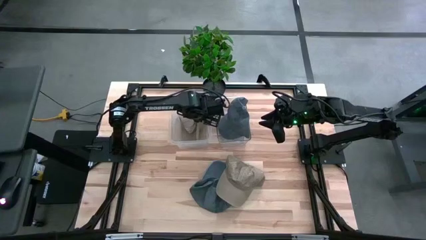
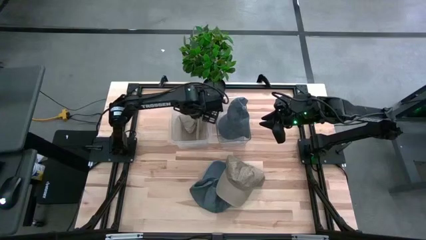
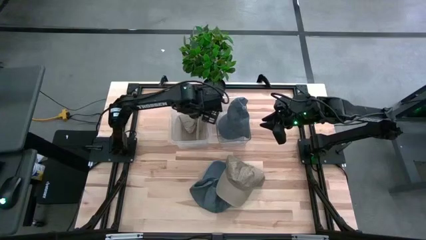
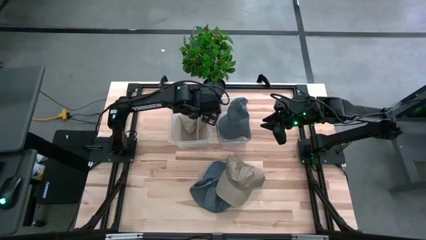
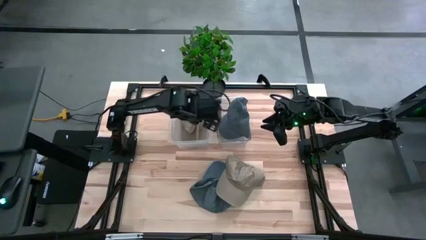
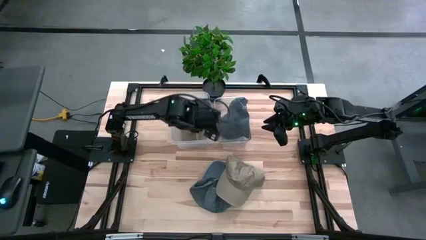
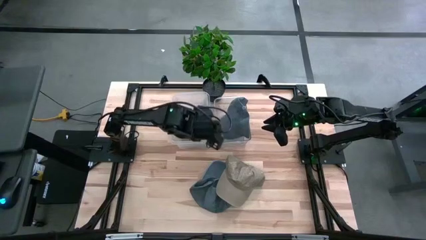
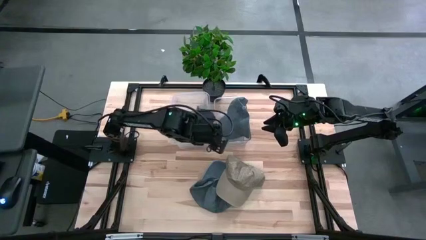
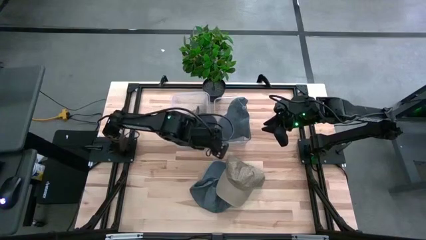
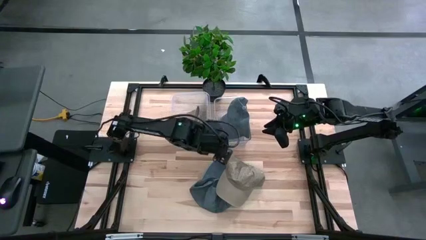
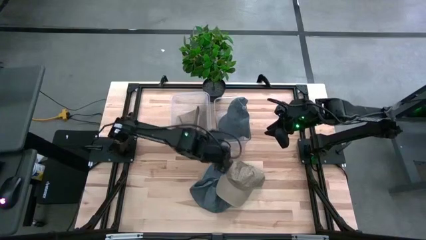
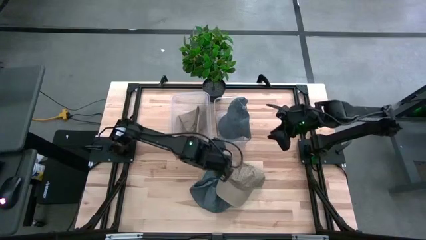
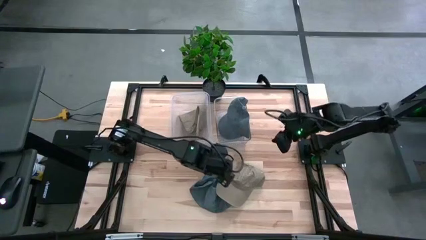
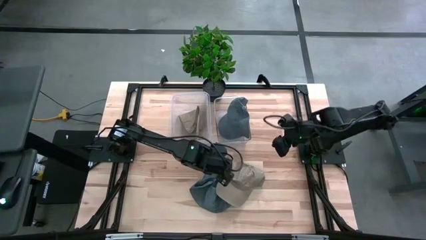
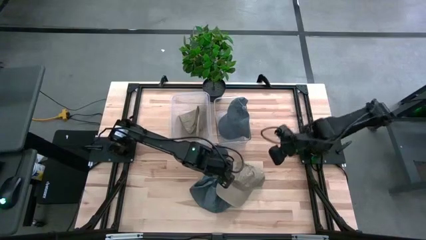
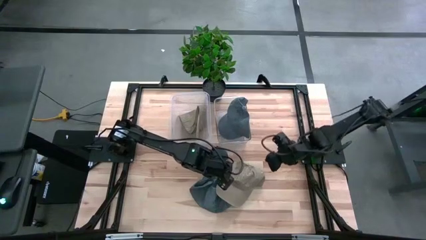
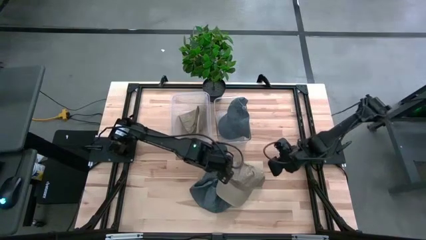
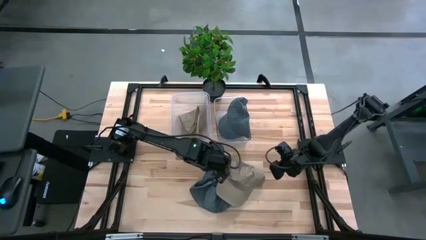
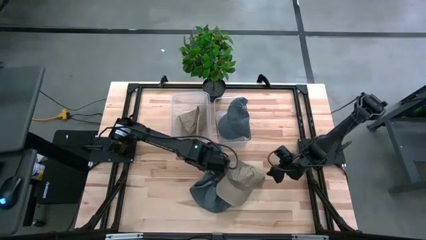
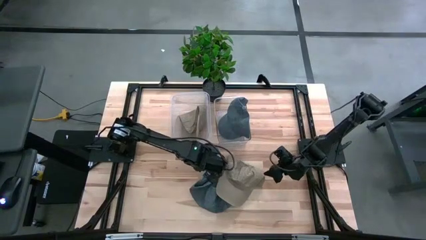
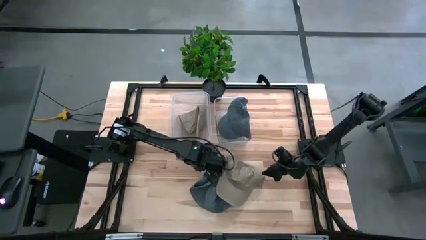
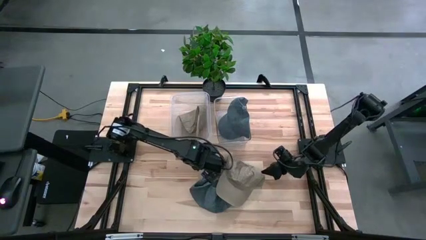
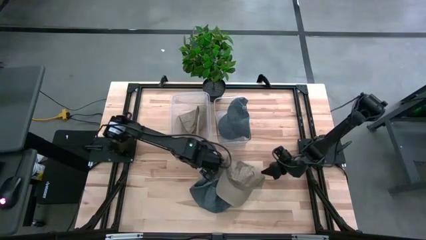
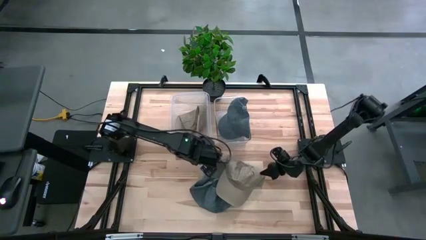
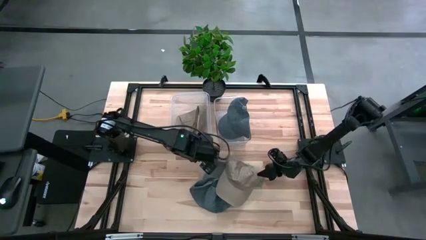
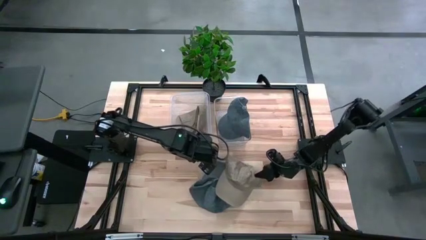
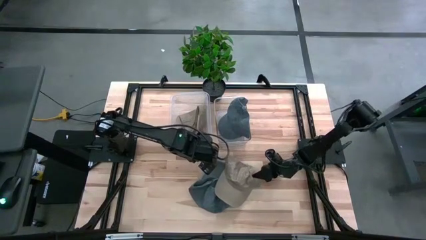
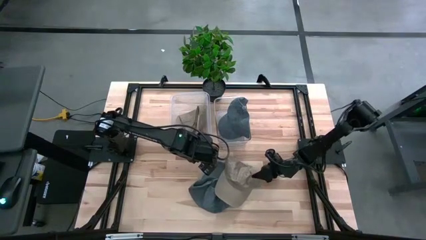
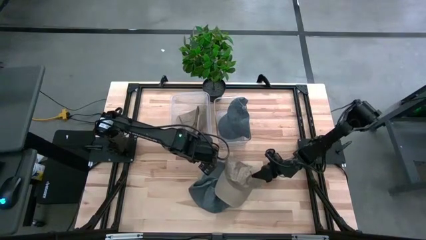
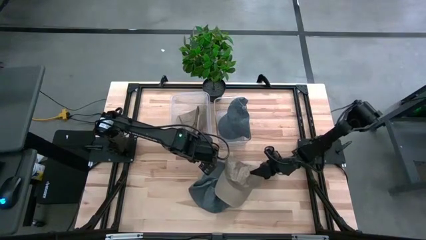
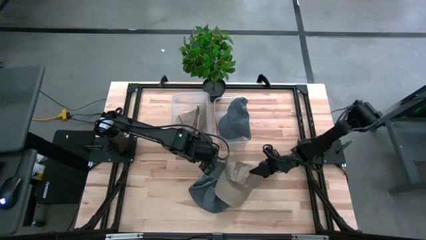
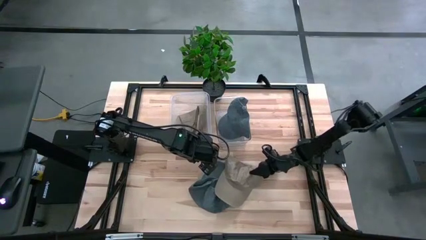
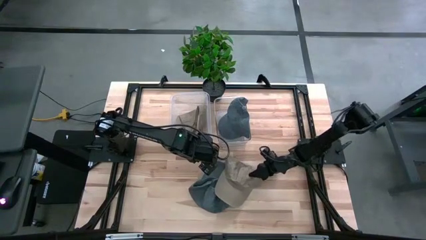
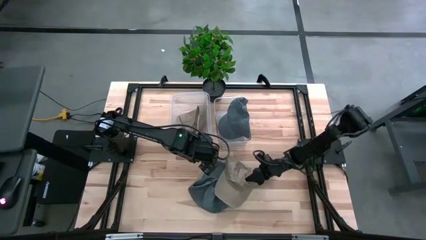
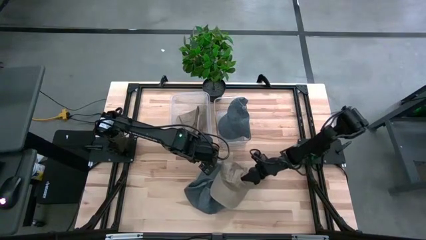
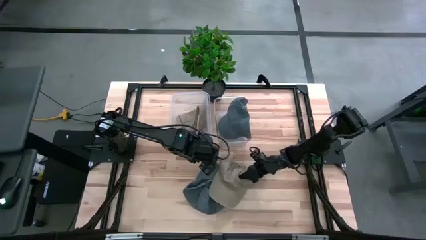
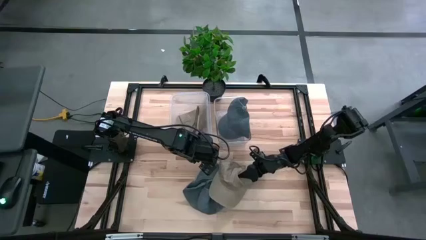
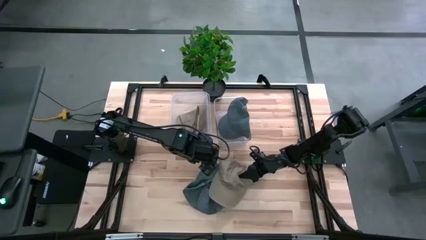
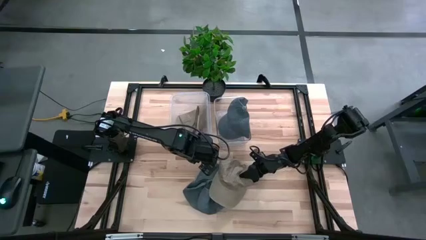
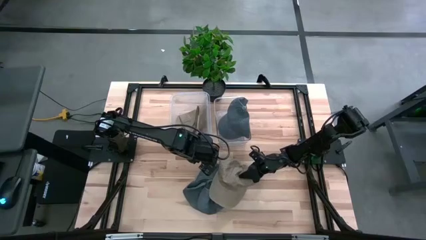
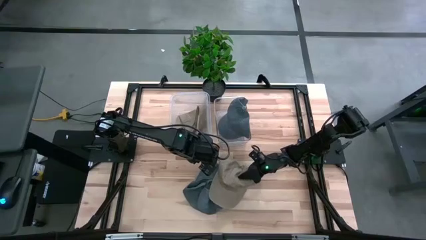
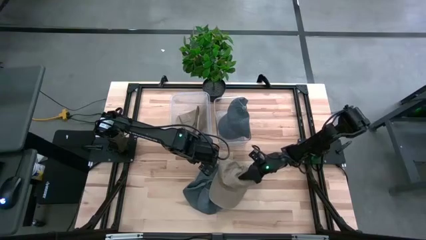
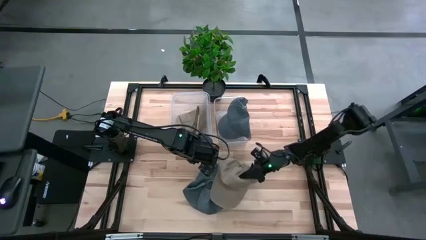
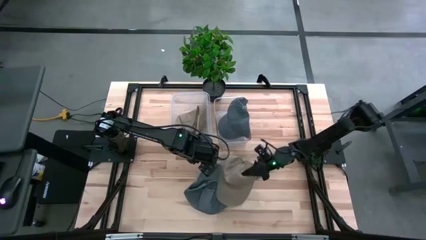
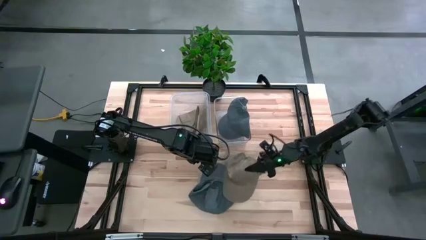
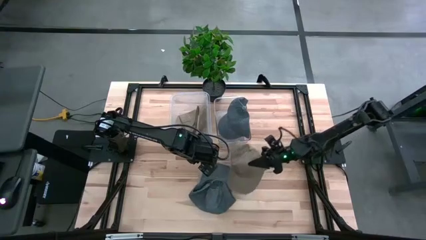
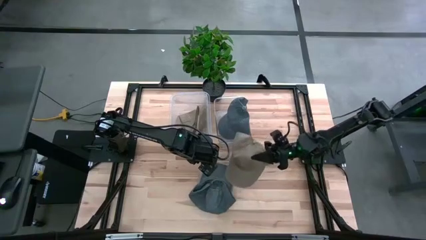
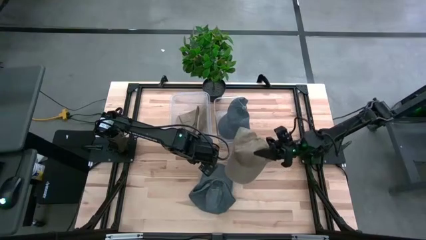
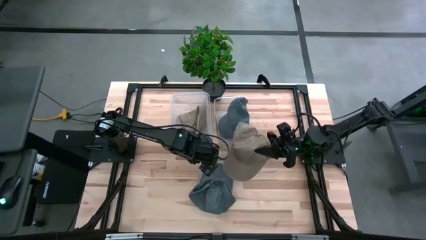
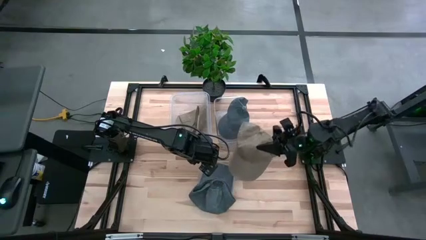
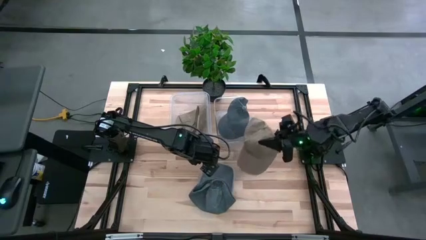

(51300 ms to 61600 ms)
Task: Pick & Place hat
Put the brown cap into the left transparent bin

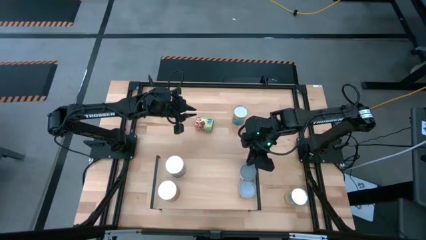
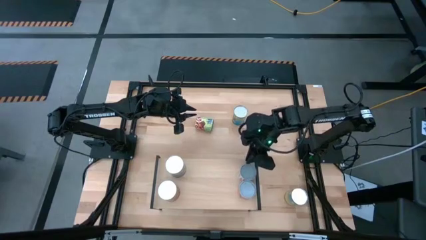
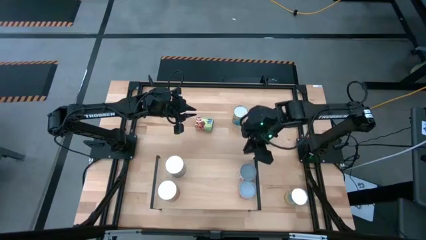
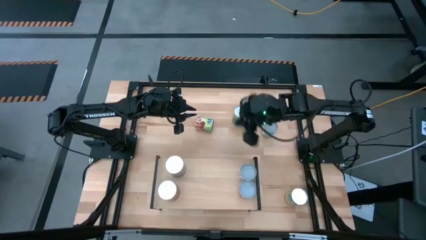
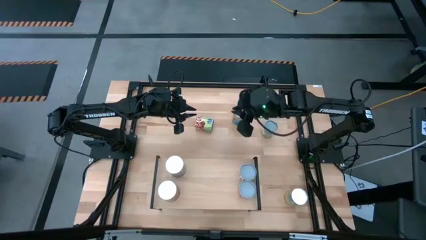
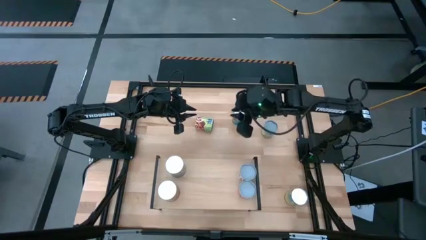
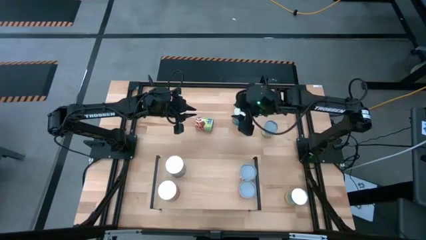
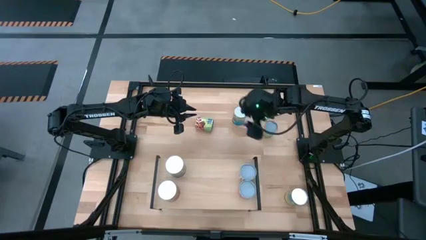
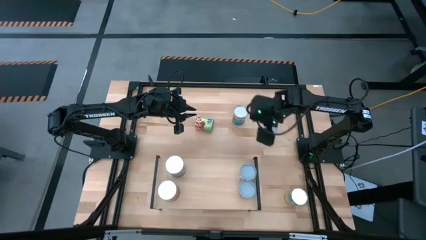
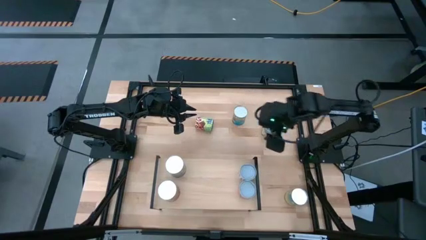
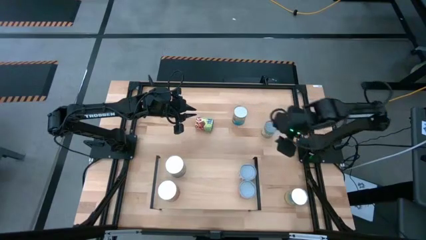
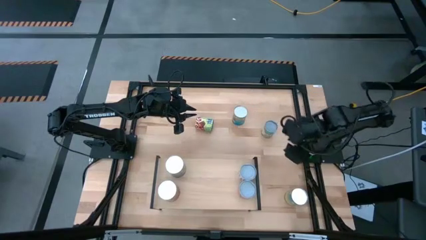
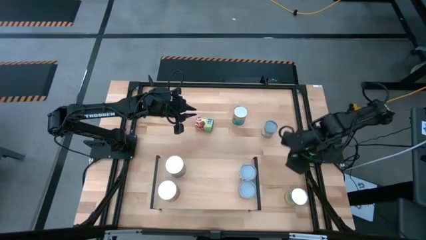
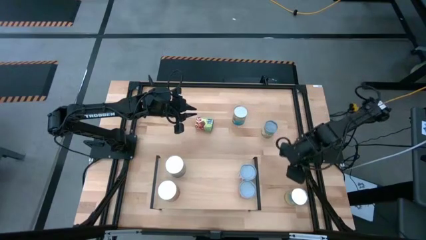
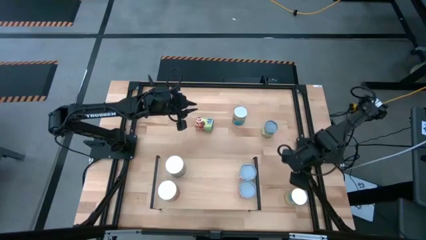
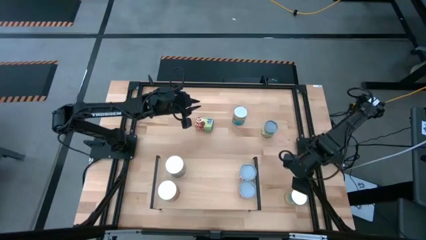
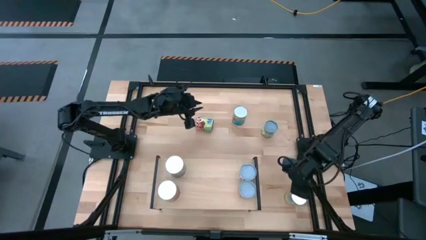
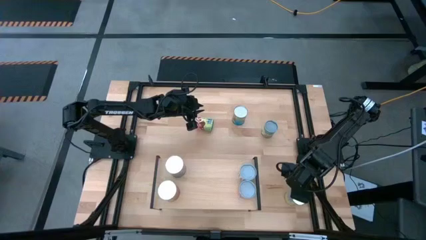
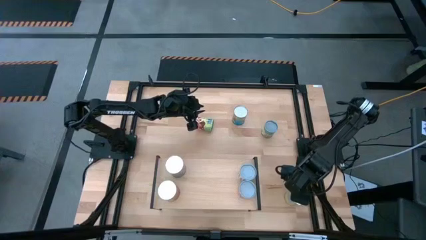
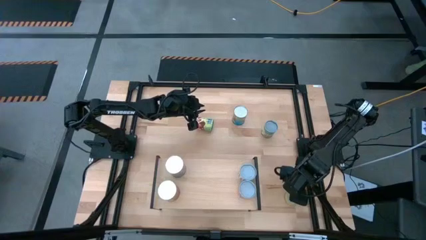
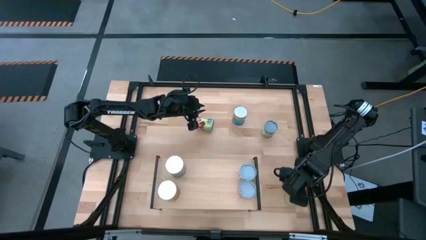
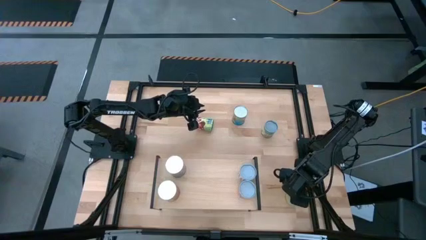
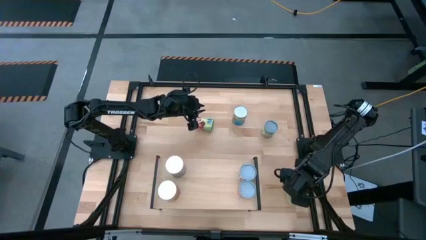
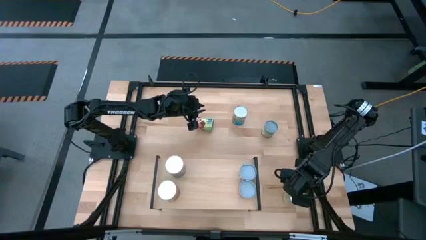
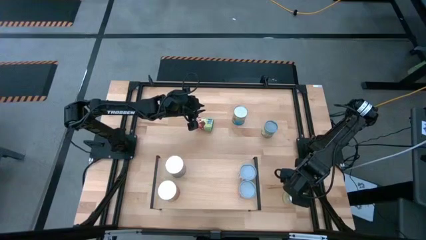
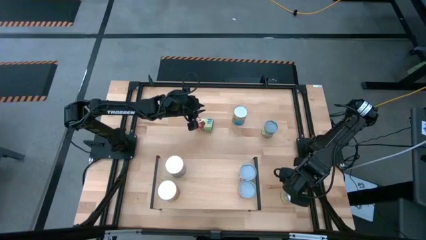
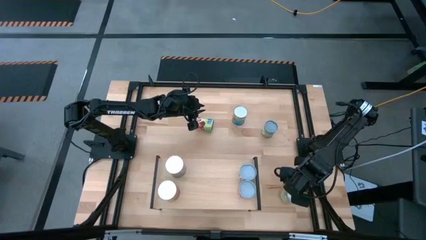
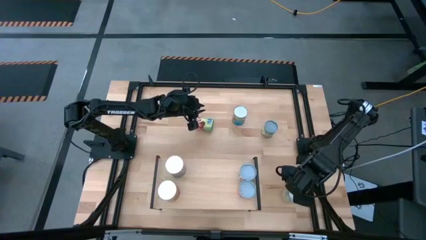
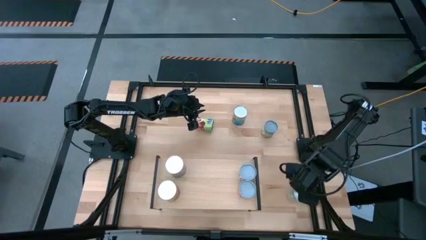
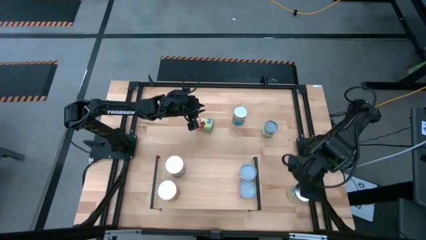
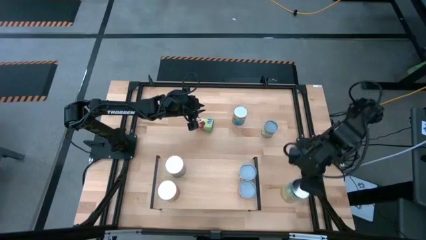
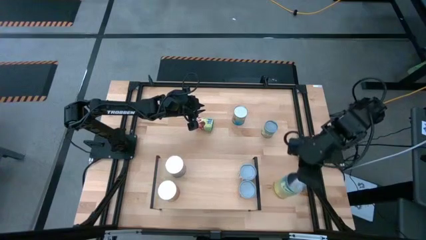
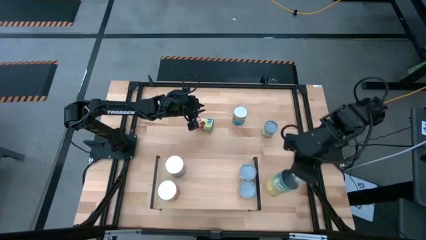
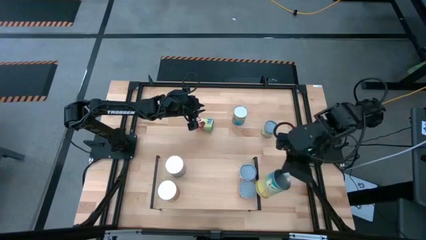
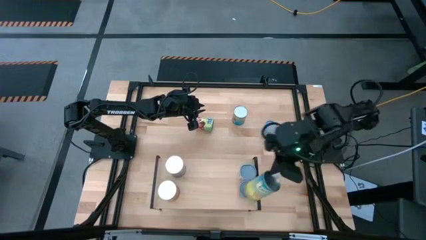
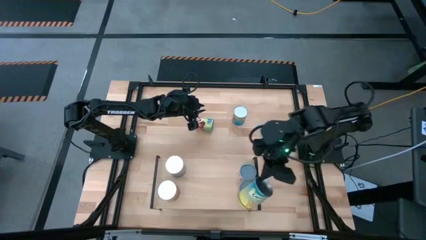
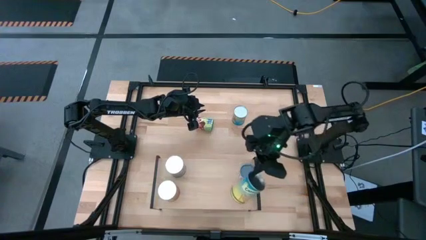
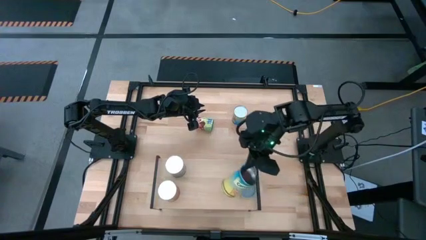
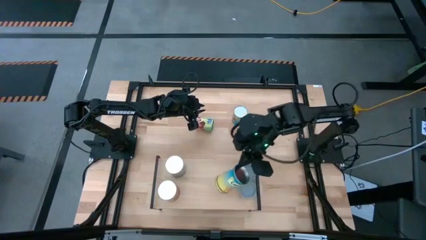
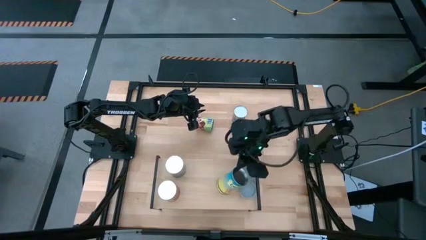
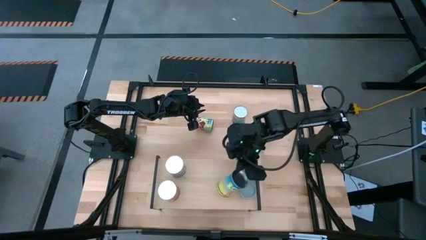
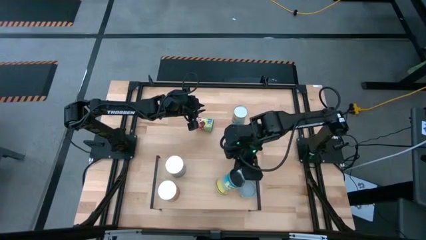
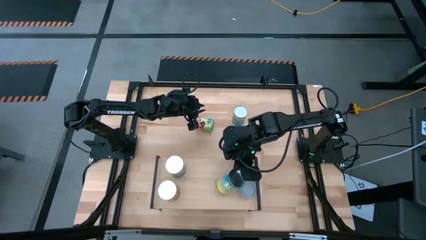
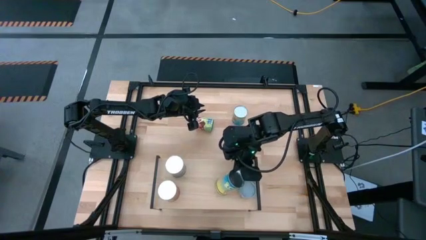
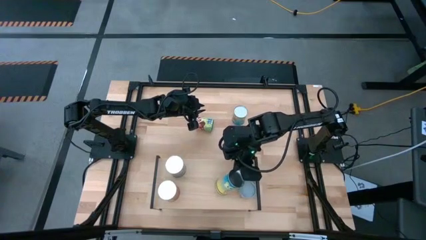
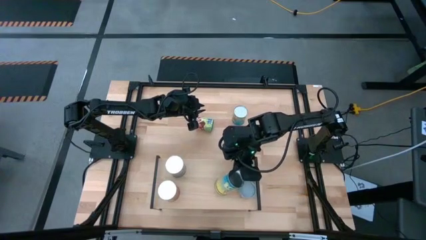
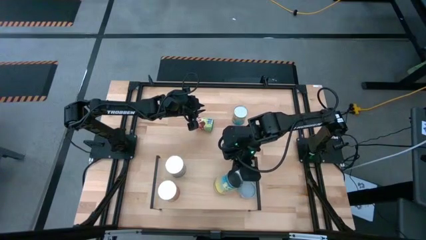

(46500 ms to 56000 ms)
Task: Pick and place cans onto a shelf
Put the canned carrots on the shelf
